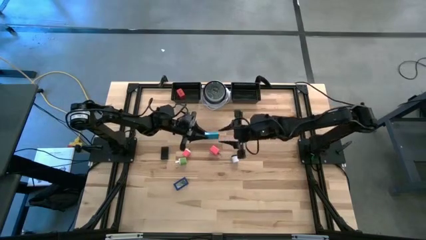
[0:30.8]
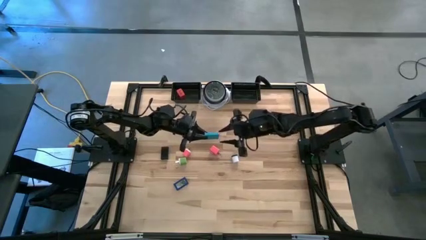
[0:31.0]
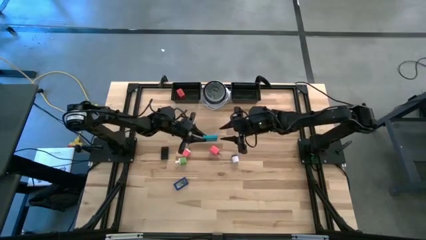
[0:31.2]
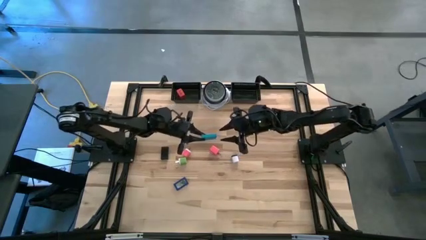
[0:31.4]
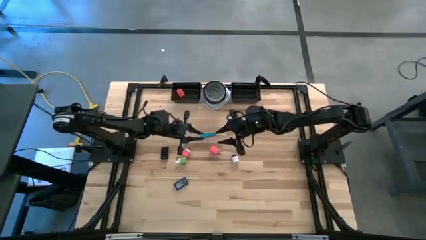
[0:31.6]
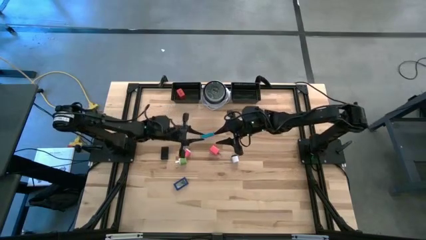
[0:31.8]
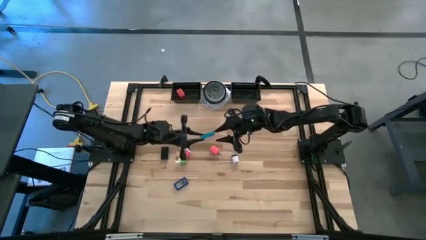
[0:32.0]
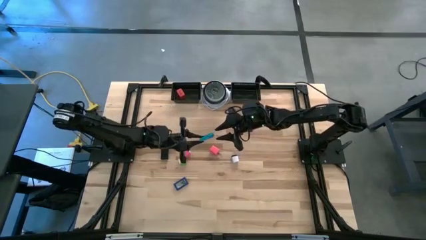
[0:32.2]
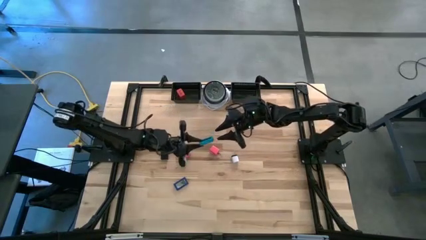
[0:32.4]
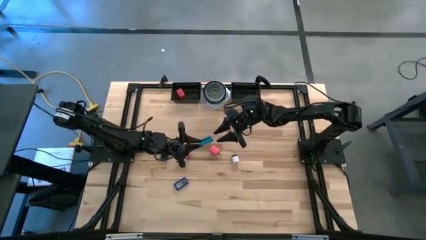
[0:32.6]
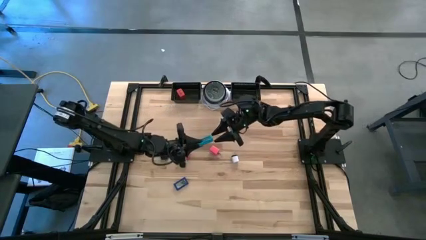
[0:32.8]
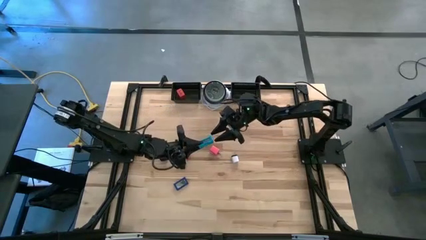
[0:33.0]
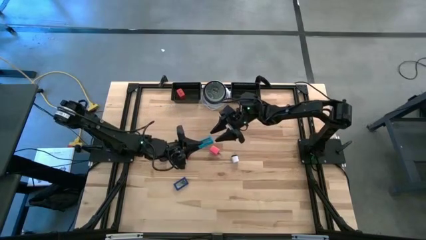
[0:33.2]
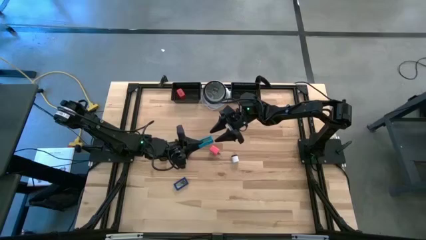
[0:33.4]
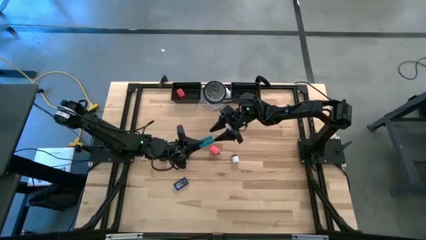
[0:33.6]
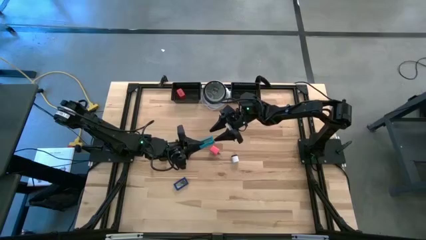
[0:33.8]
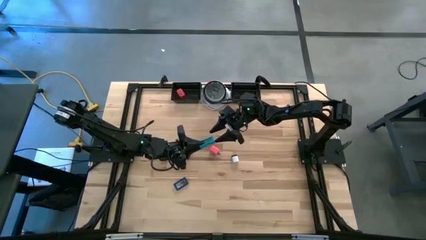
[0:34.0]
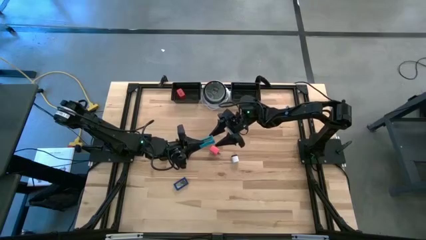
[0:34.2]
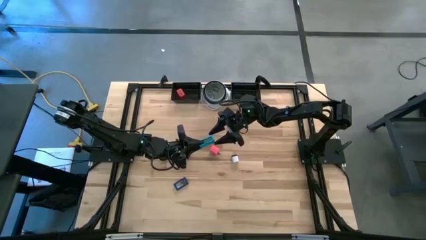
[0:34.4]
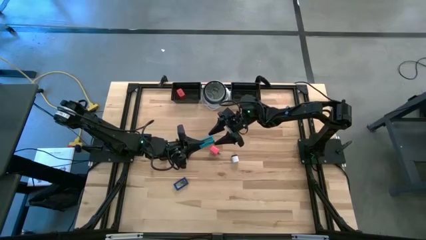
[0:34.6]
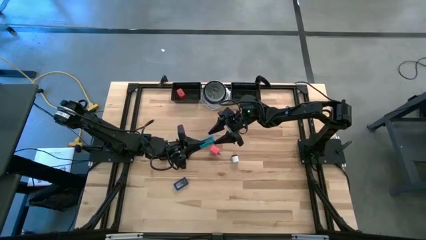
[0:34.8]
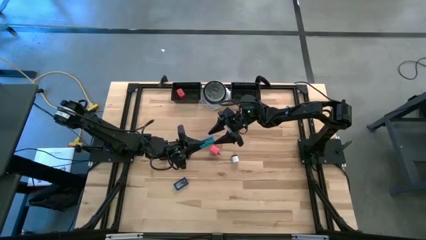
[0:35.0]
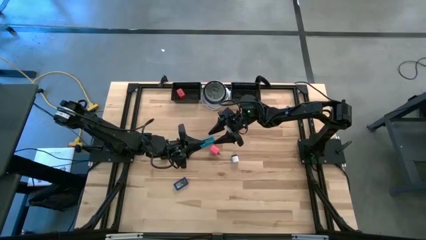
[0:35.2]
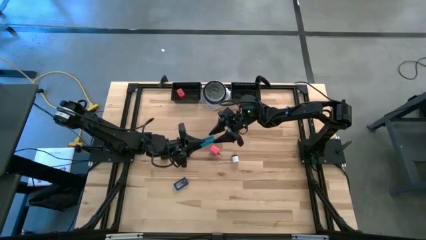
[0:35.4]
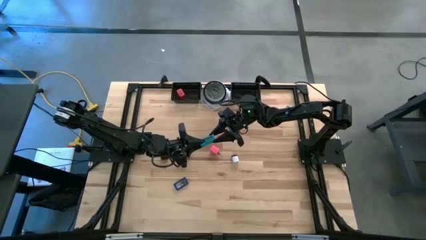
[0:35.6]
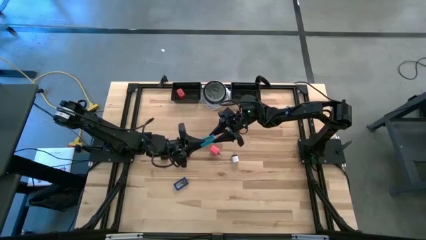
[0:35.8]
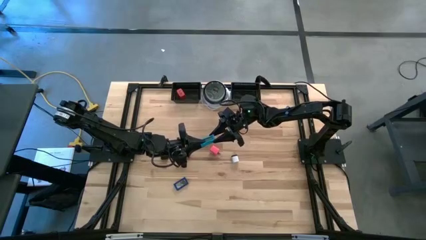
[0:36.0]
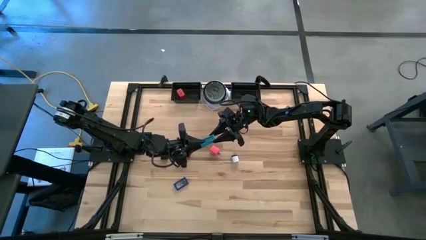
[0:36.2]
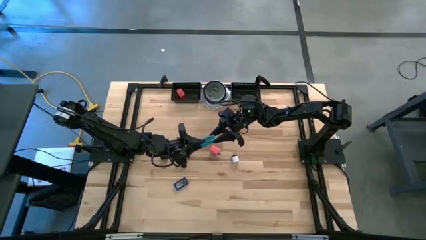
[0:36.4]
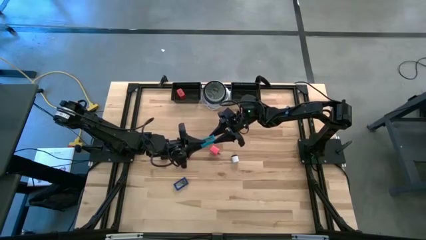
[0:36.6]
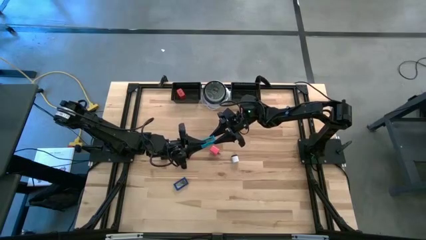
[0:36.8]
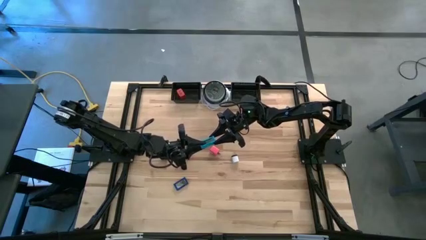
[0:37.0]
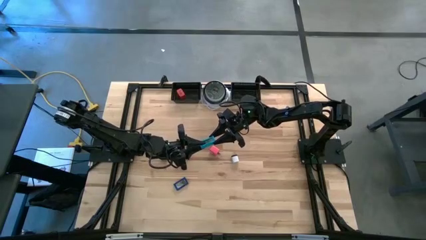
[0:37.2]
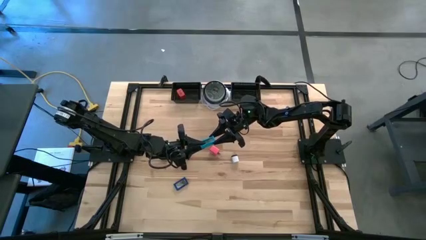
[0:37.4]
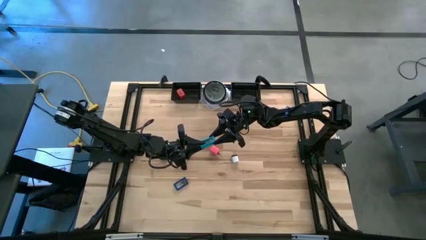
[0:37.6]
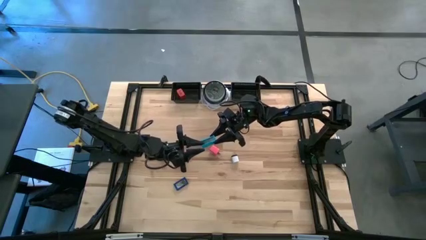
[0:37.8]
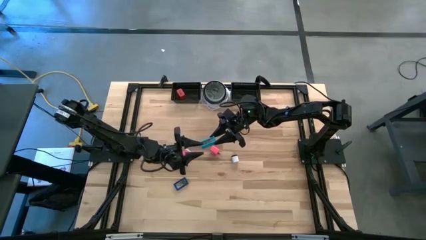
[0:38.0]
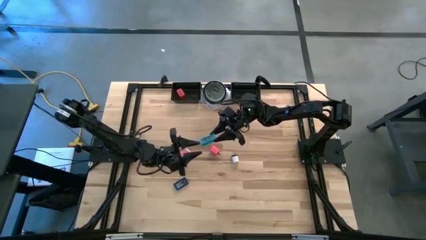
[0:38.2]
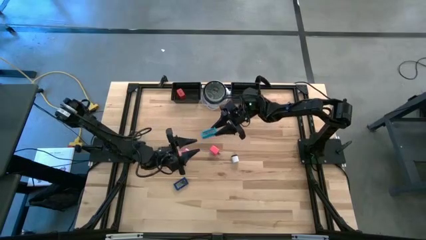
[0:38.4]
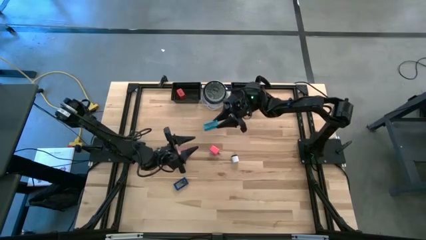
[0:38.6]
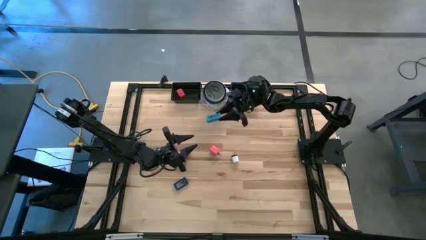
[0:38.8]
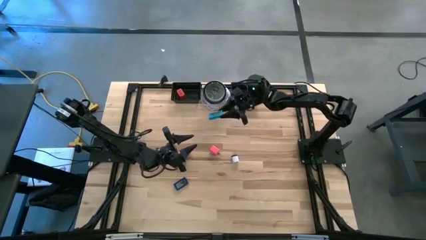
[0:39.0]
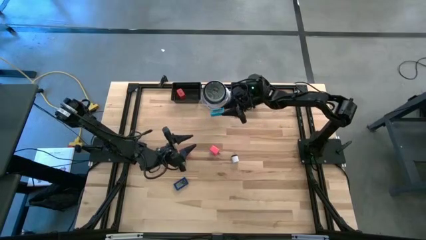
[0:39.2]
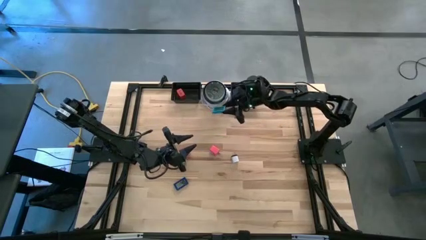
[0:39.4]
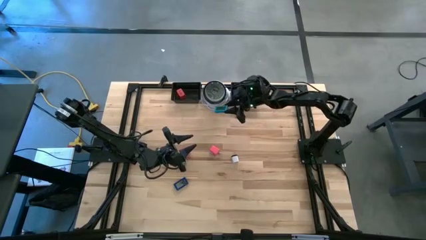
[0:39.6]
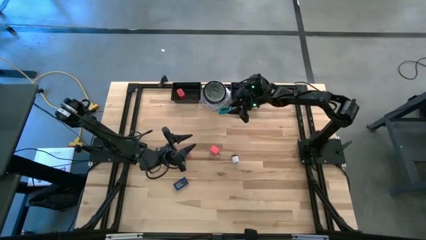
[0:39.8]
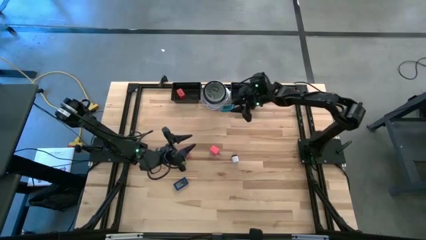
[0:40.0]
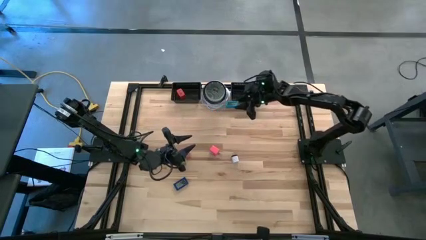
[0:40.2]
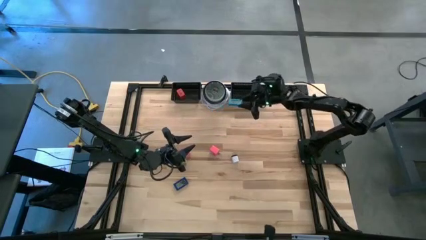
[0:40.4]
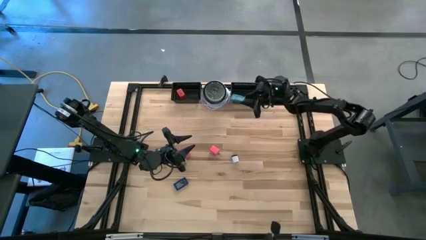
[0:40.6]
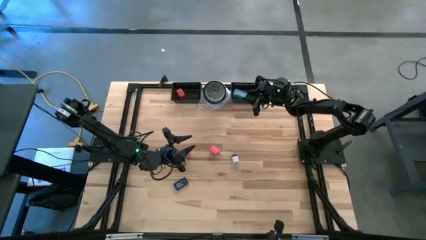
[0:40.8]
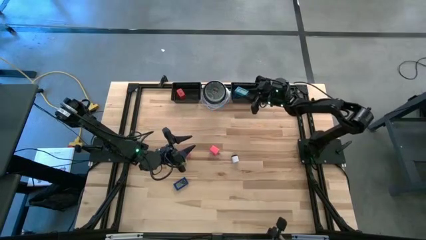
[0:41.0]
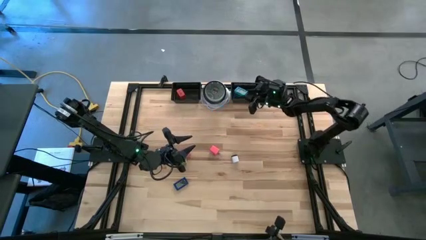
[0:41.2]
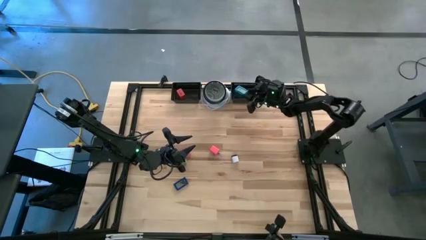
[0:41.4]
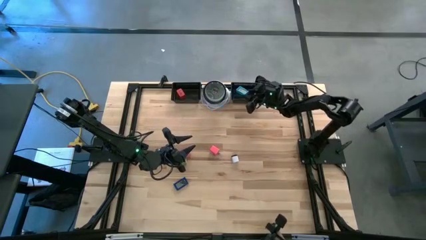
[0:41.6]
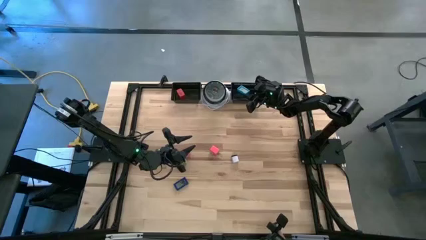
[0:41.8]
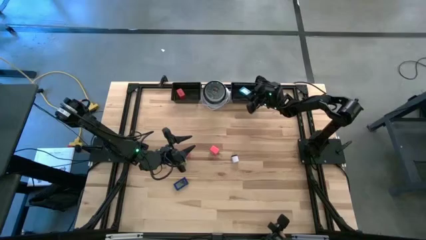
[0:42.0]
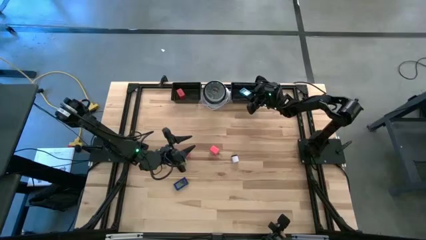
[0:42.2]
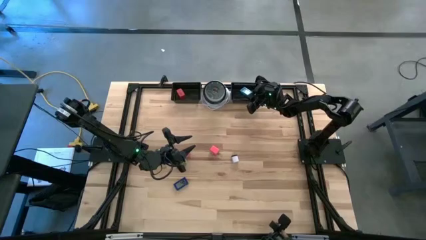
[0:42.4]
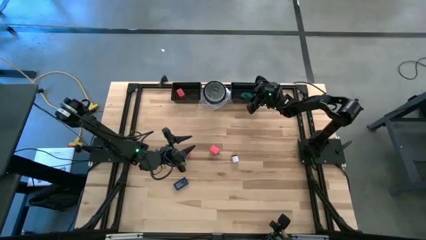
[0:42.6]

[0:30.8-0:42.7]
Task: Pick & Place Office items
Put the light blue digital clock into the right black basket
